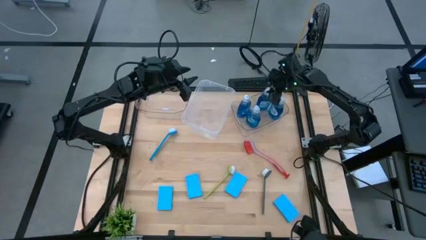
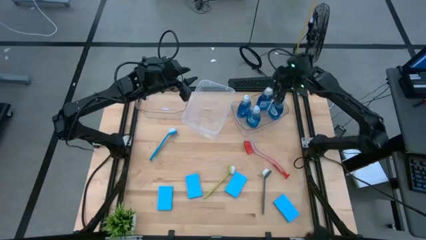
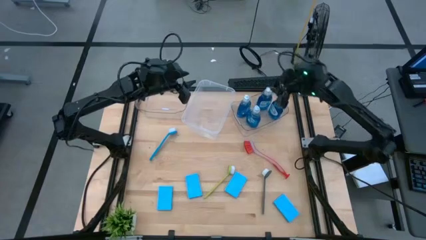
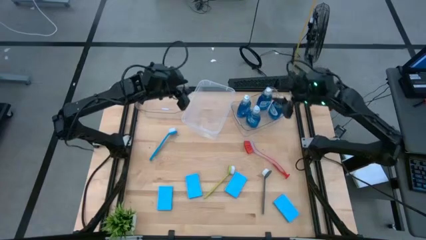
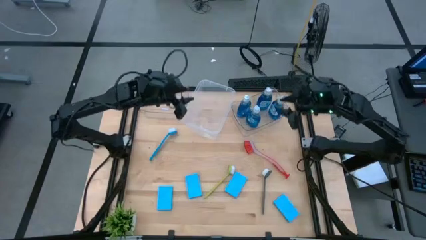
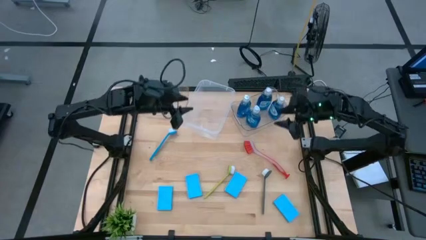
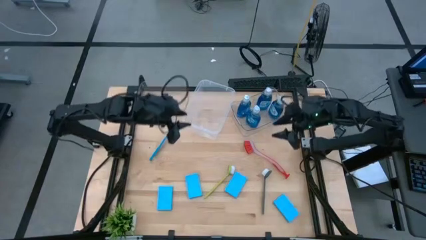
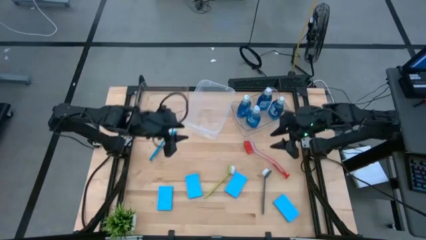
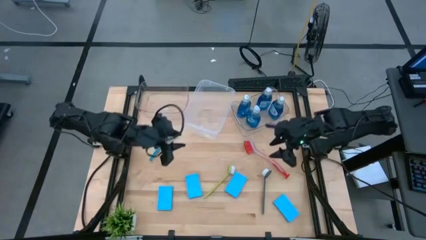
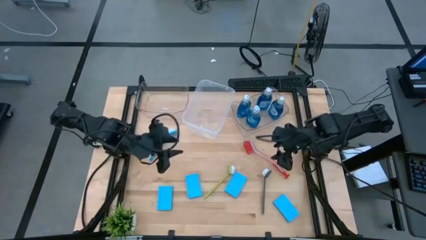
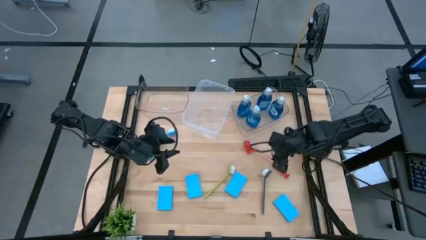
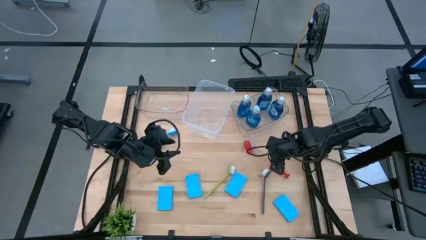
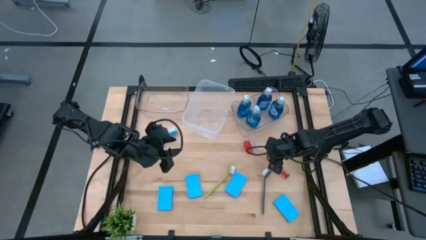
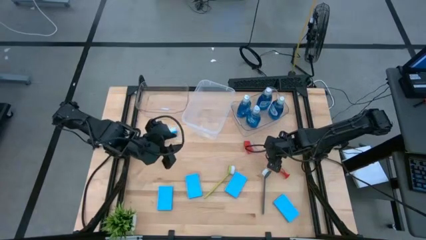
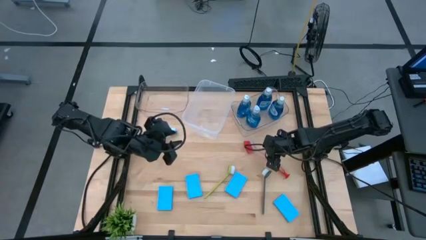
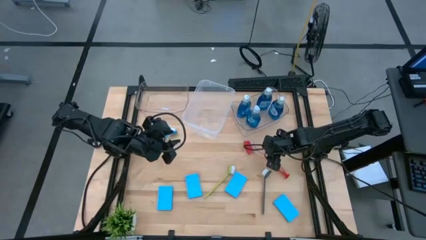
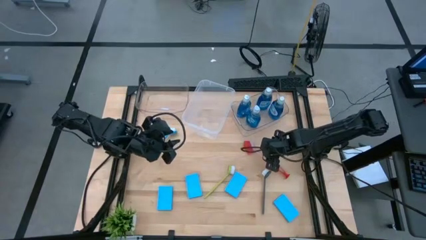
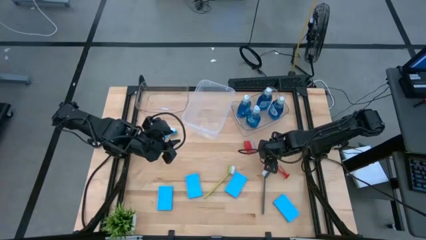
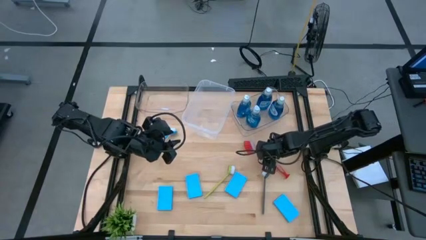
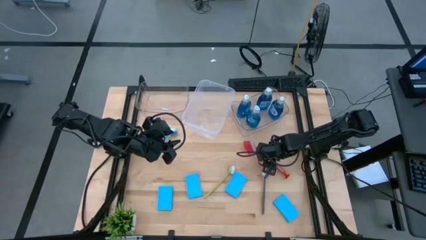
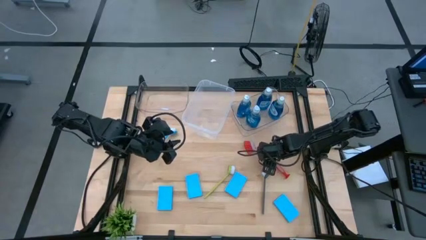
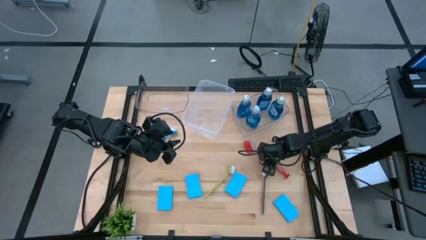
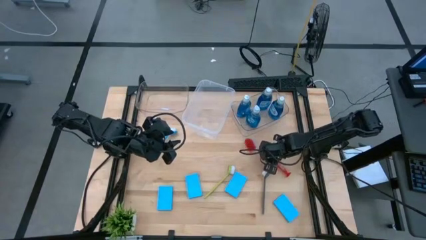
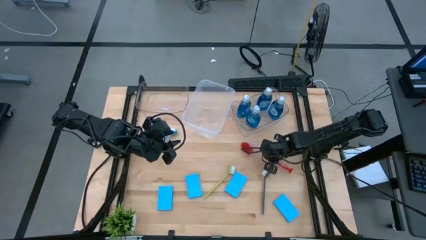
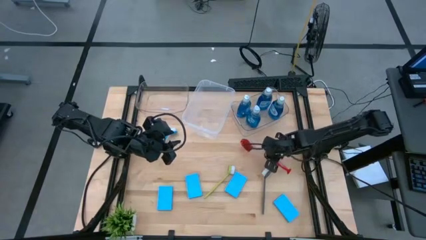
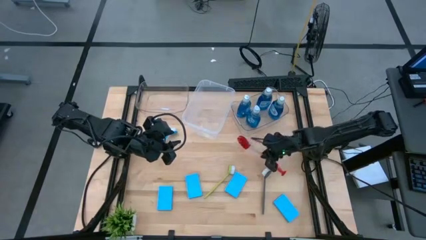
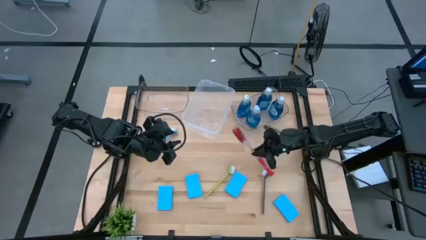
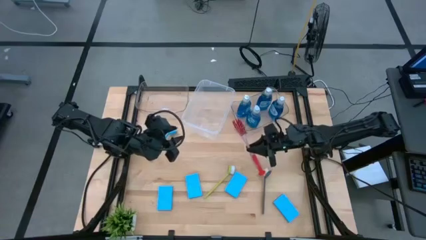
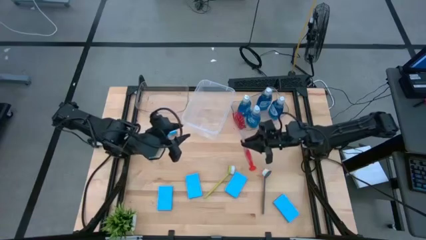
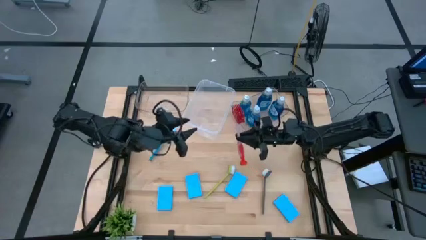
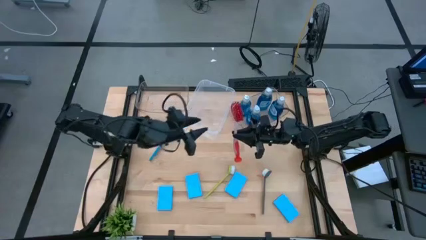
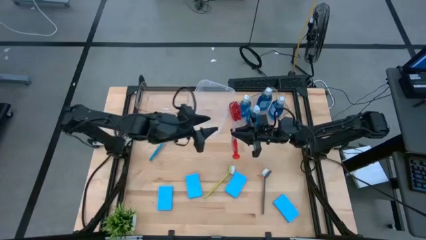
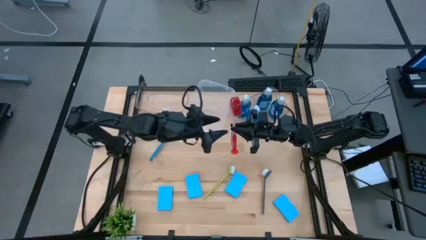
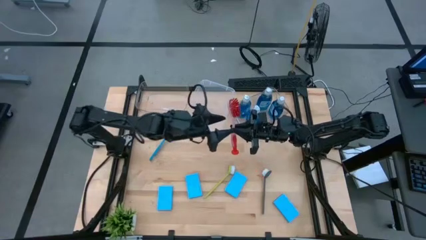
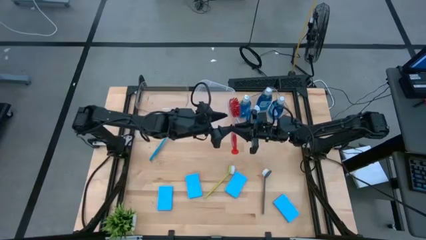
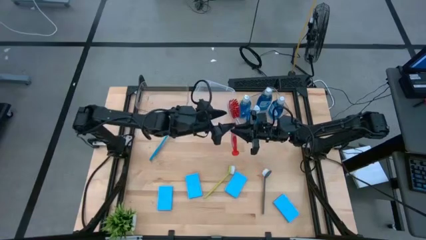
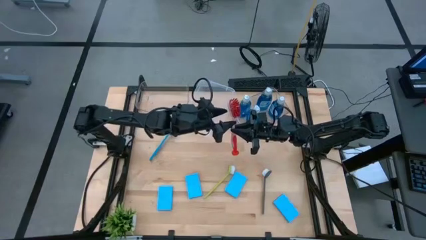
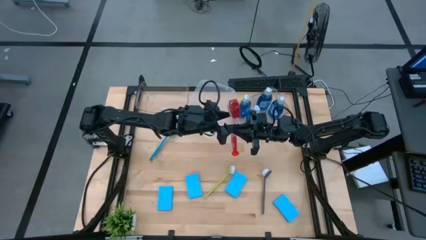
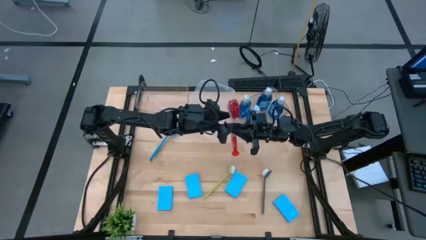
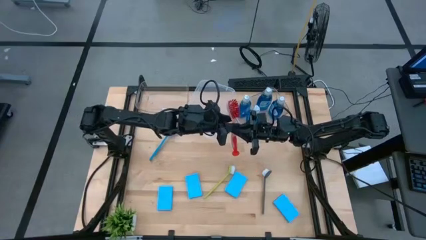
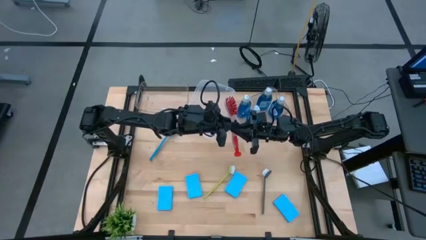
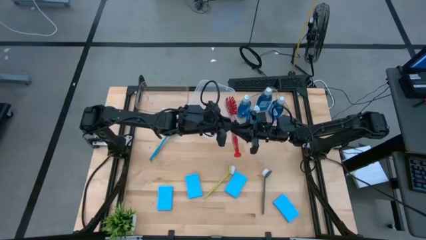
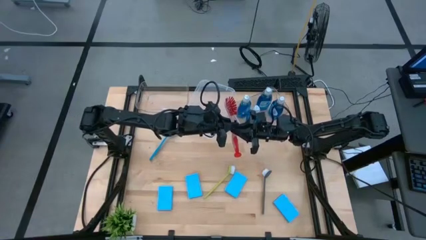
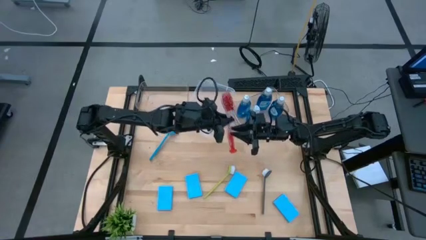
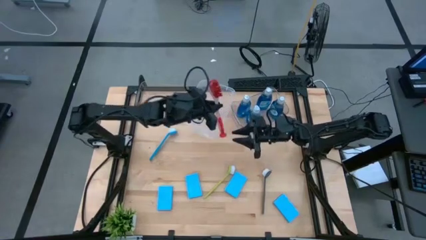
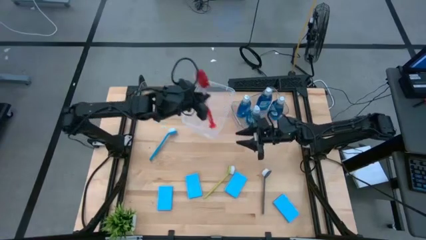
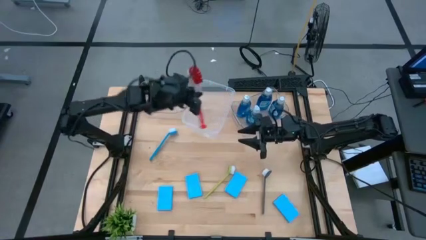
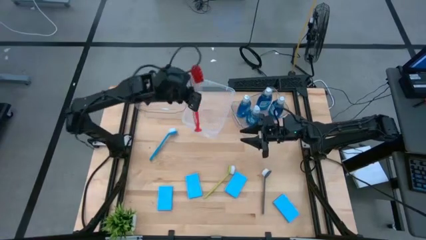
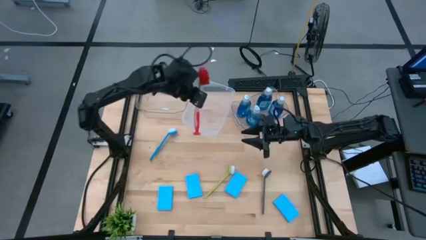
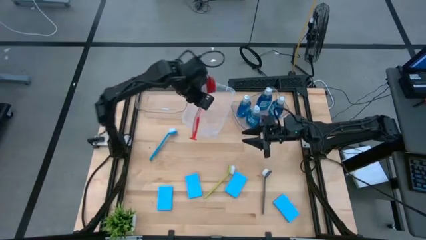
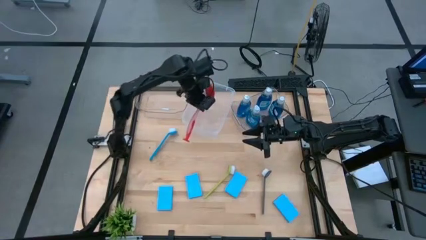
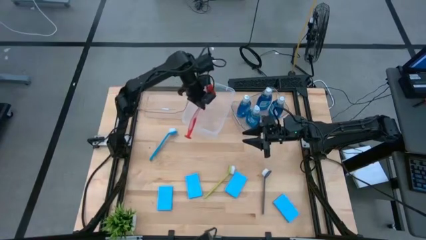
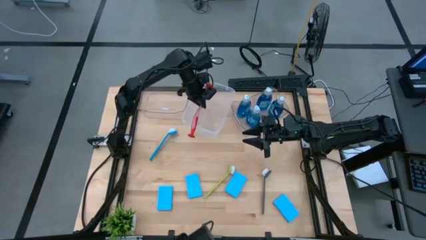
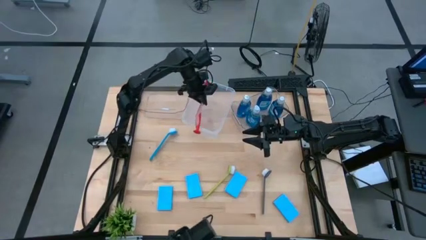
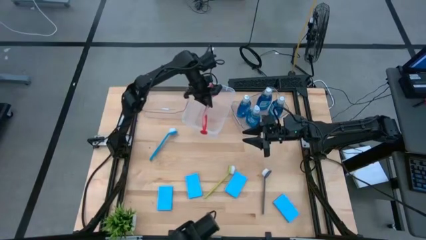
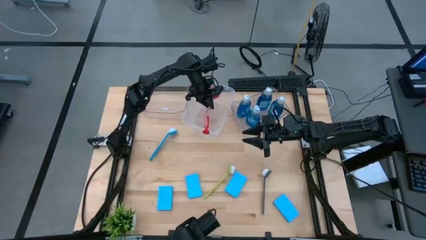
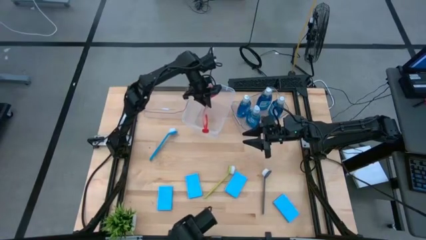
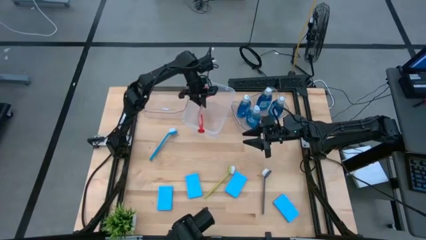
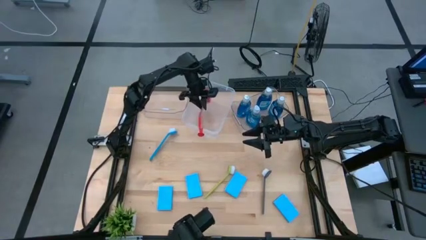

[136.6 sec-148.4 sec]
Task: Pick & Place Kitchen Sink Supplies
Put the red dish brush into the transparent container

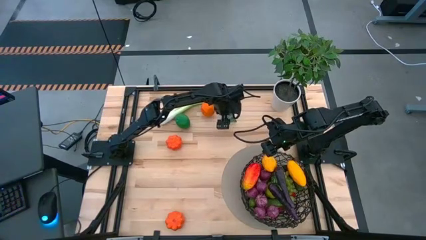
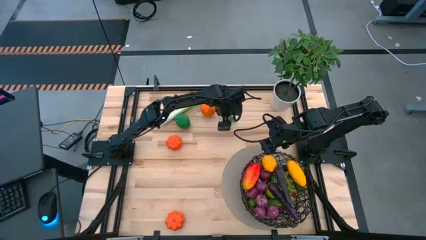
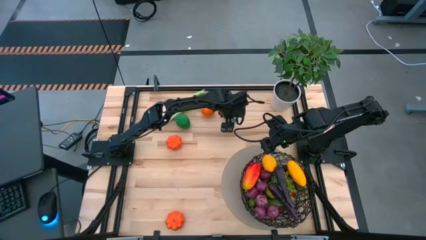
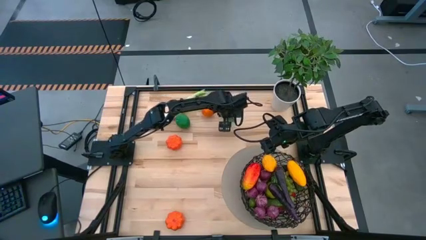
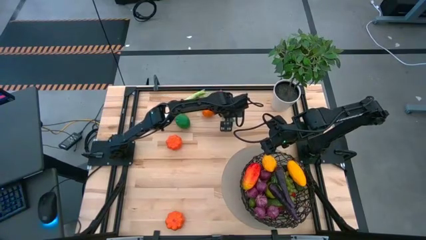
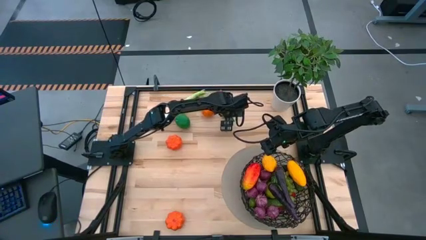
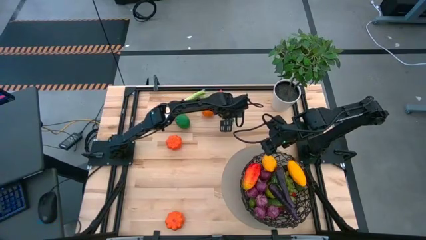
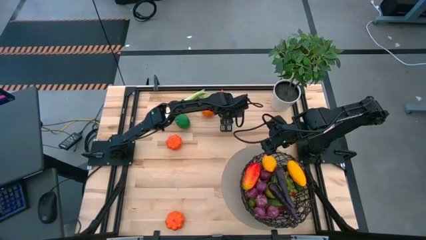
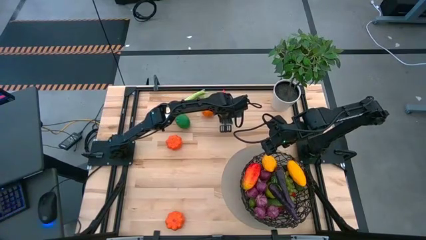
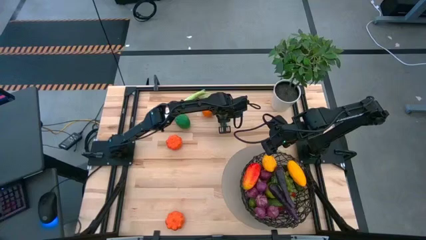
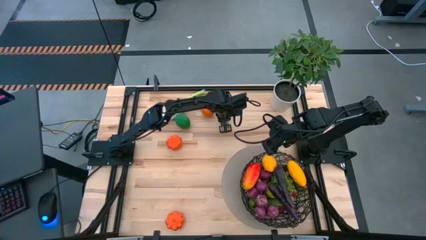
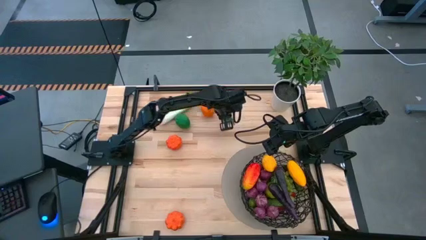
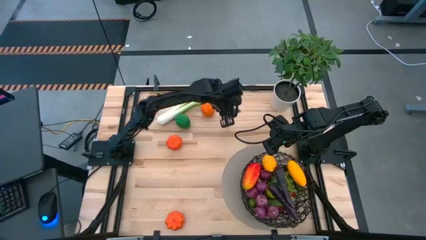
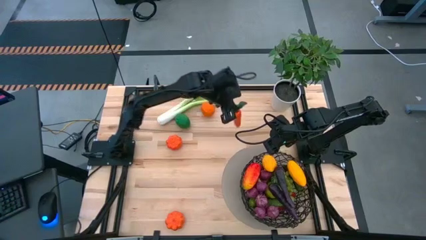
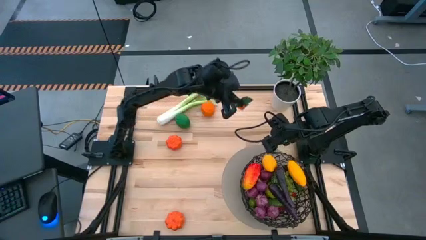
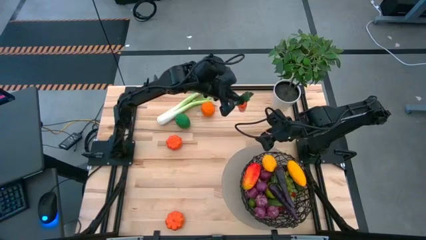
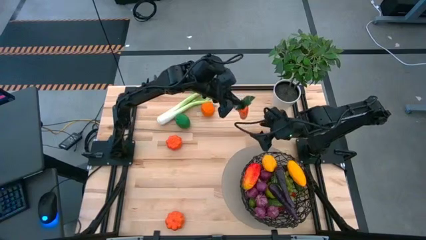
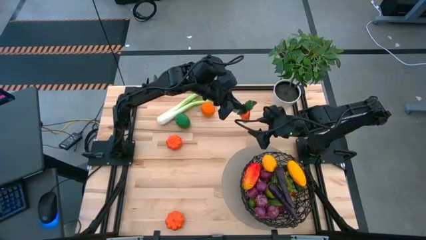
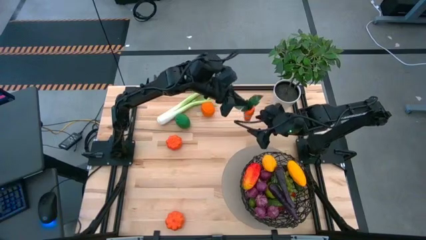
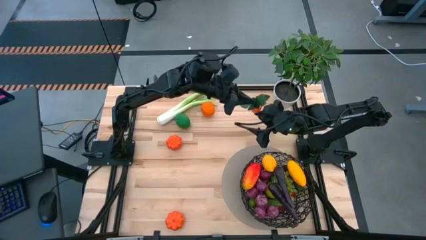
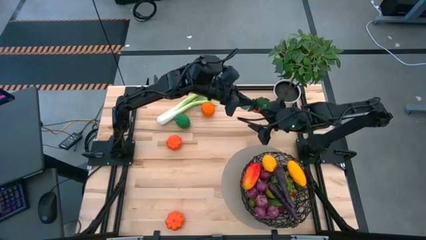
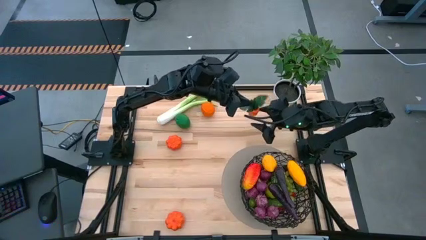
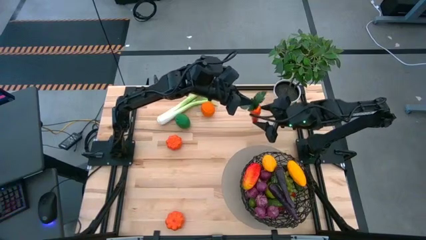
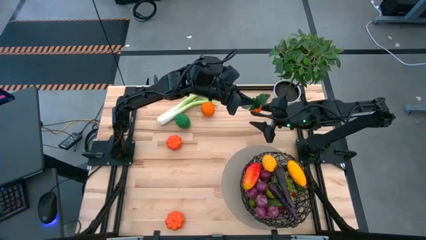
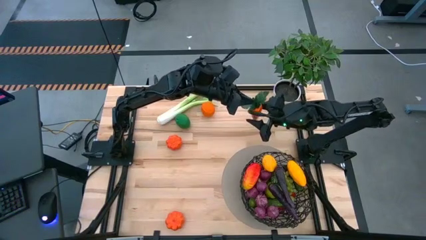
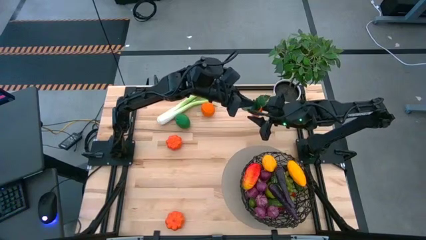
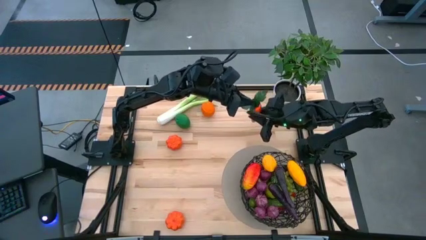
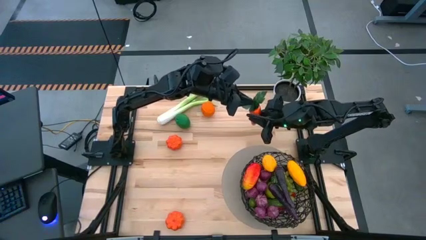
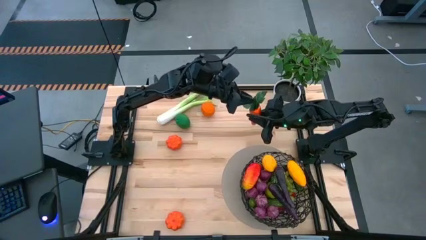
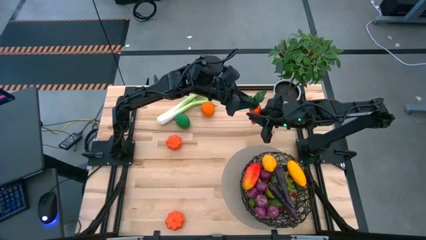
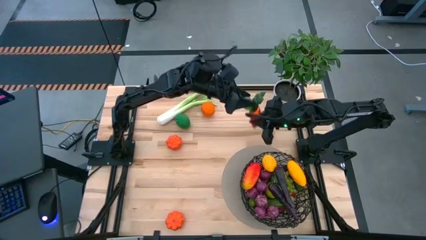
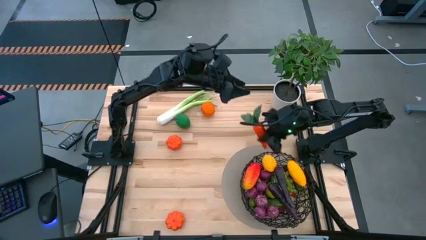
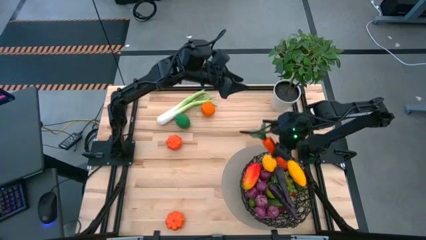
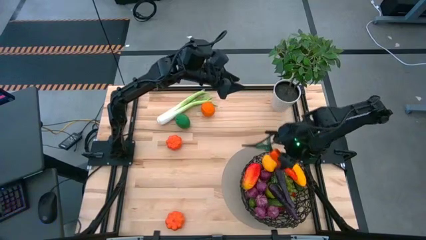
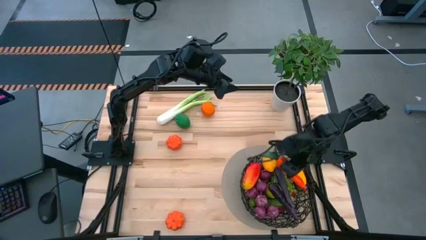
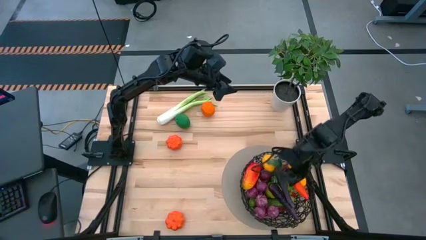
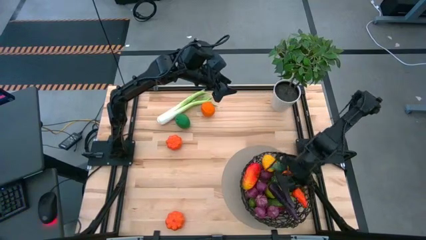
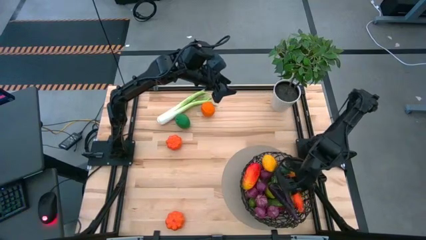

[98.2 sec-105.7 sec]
Task: Build produce basket
Put the orange carrot into the black basket
